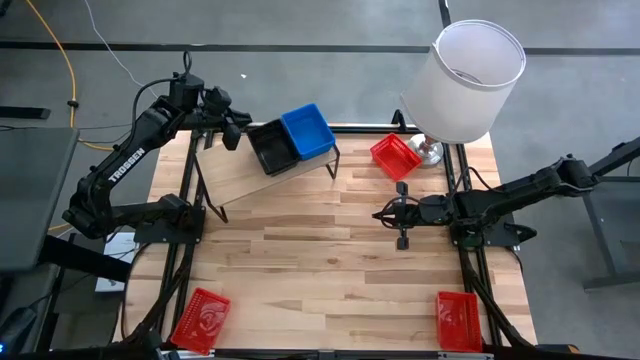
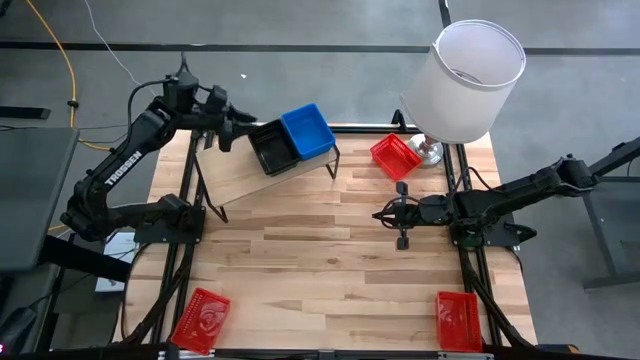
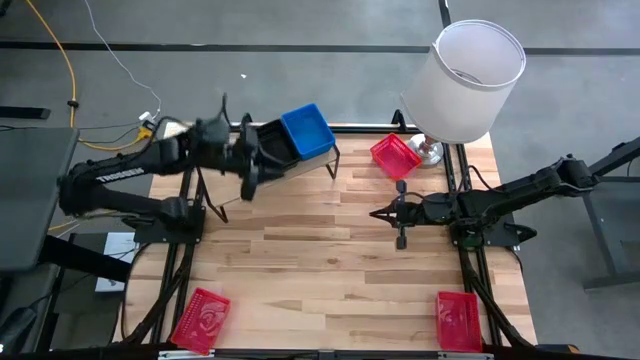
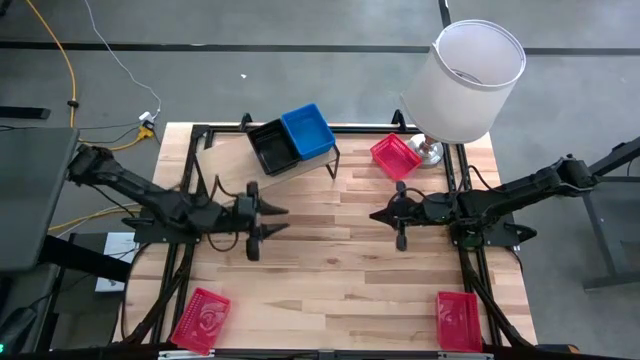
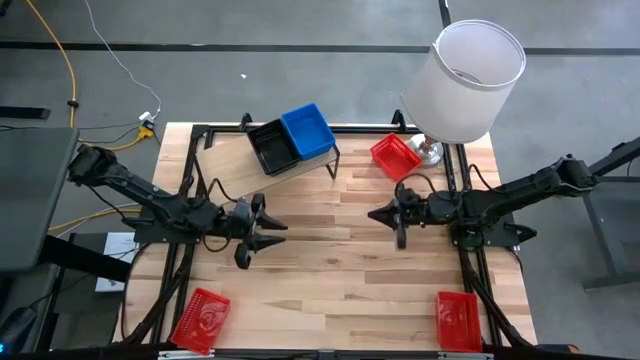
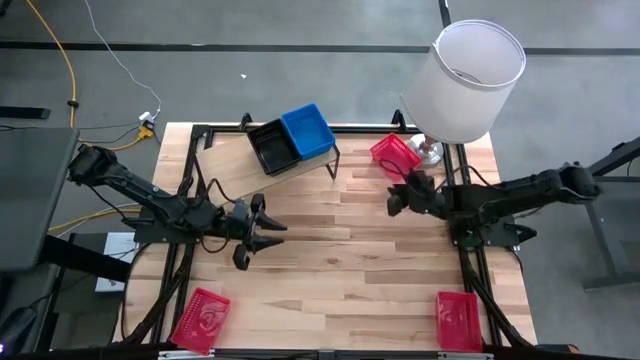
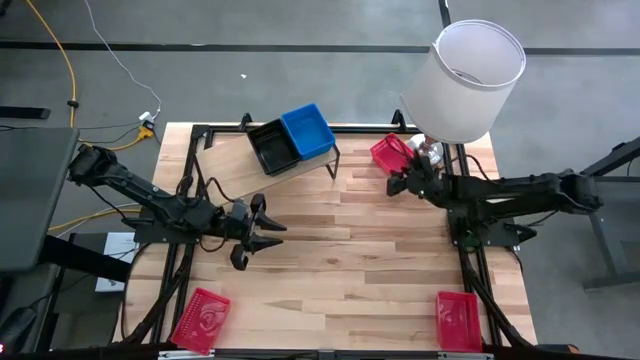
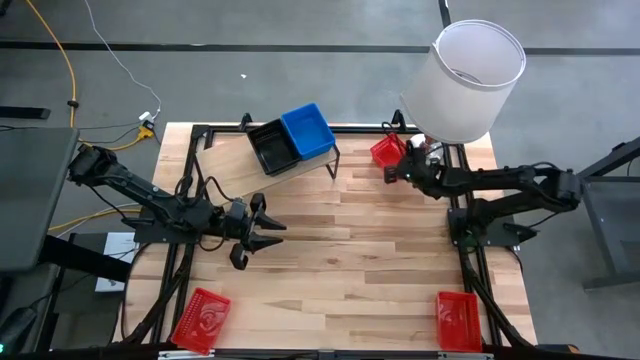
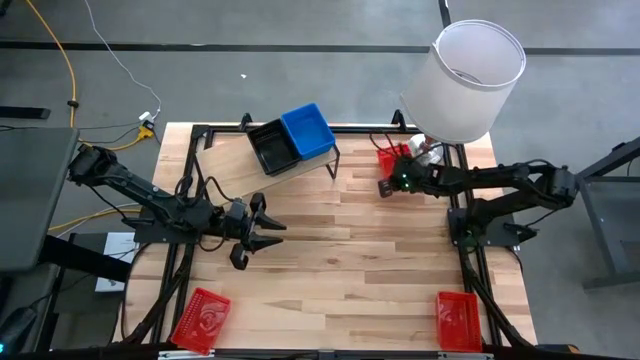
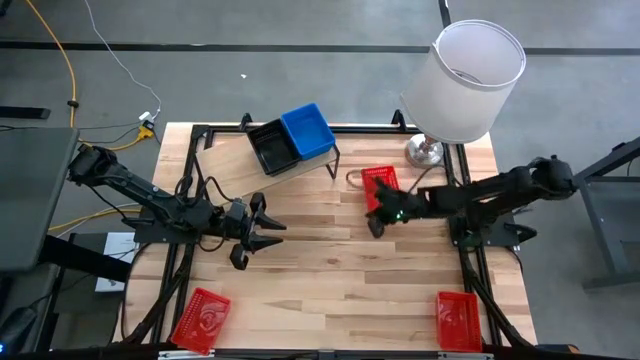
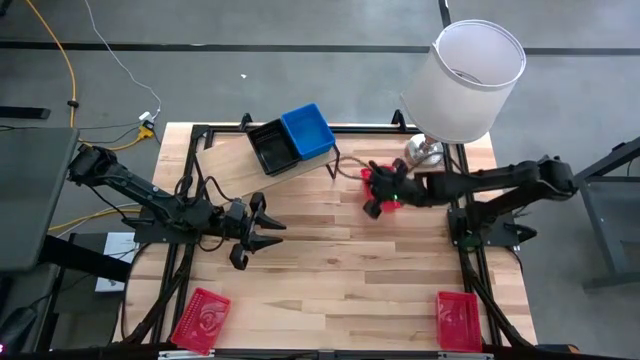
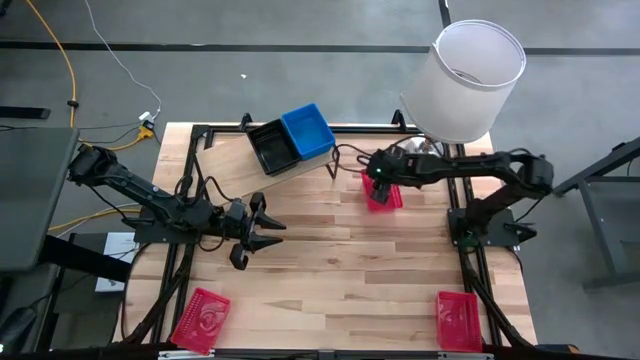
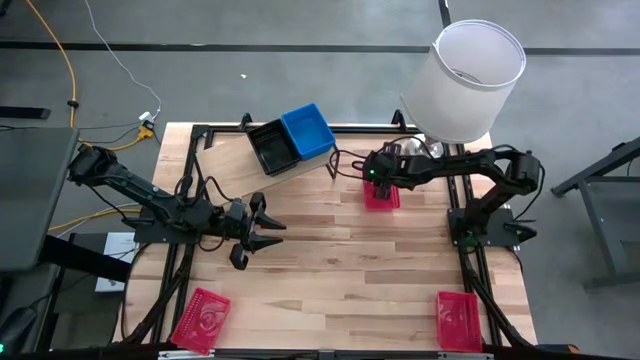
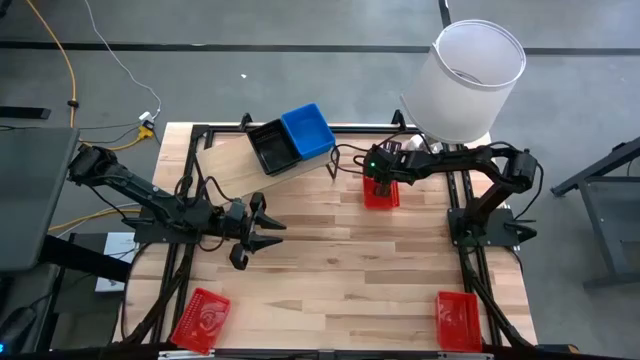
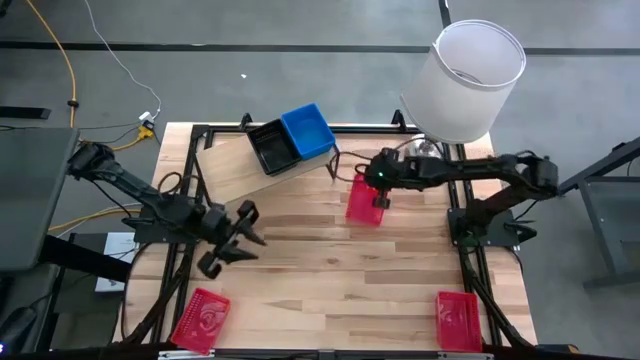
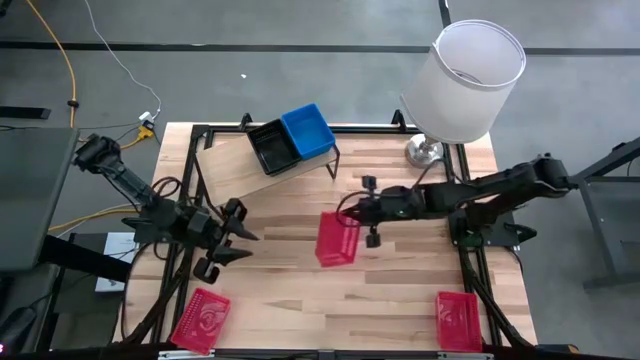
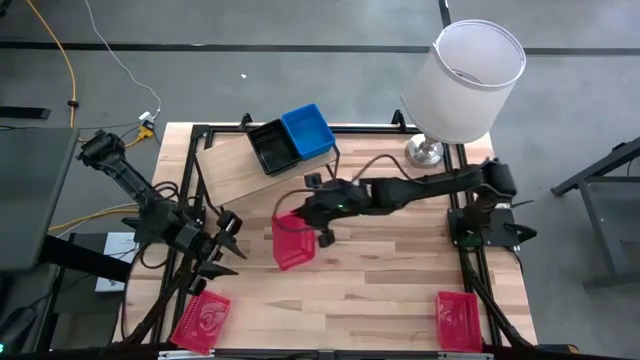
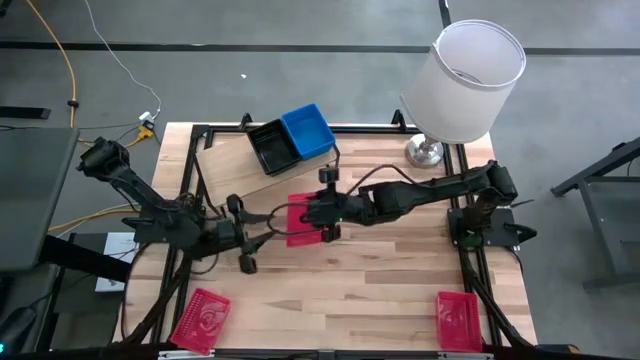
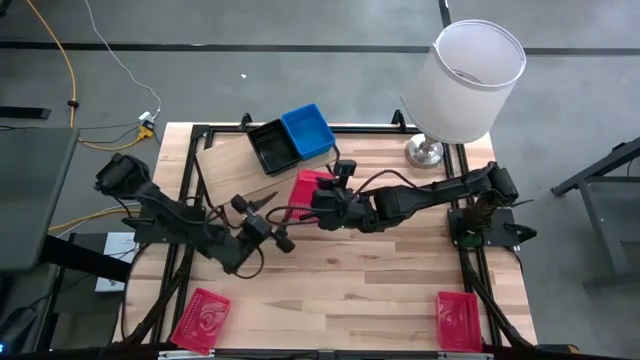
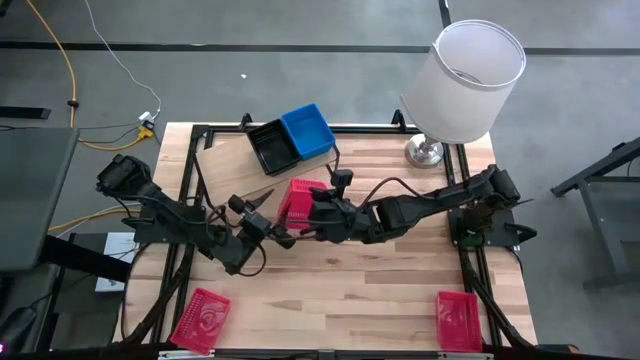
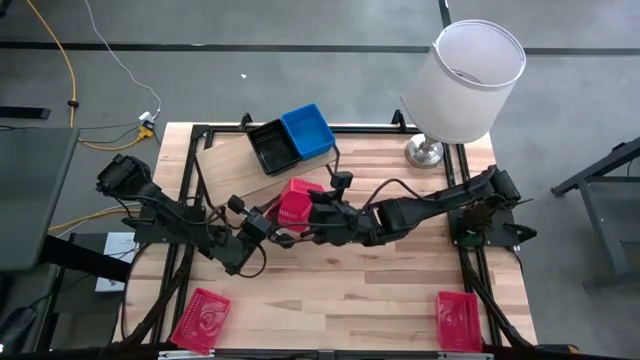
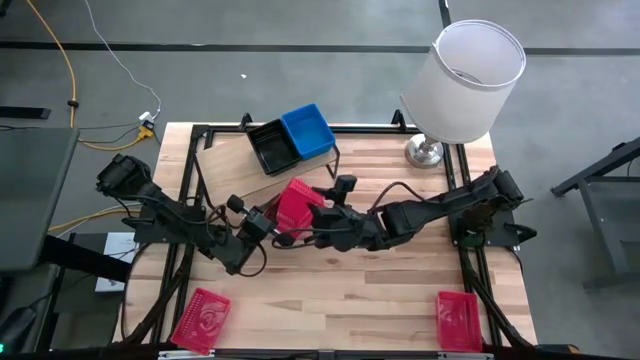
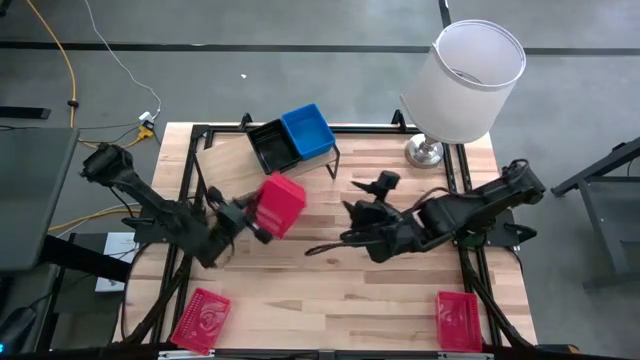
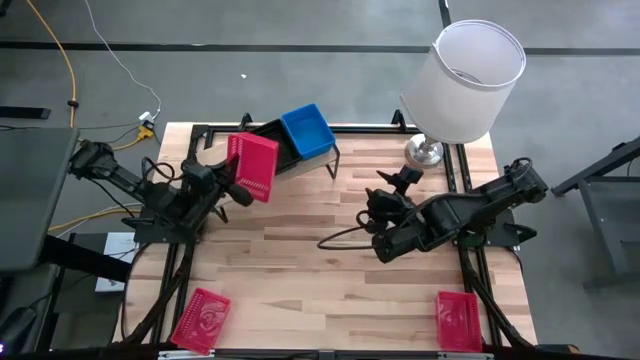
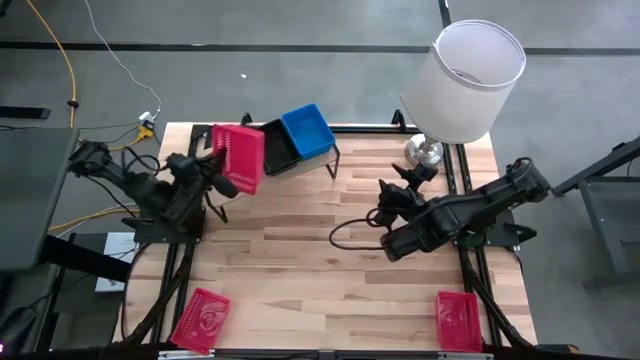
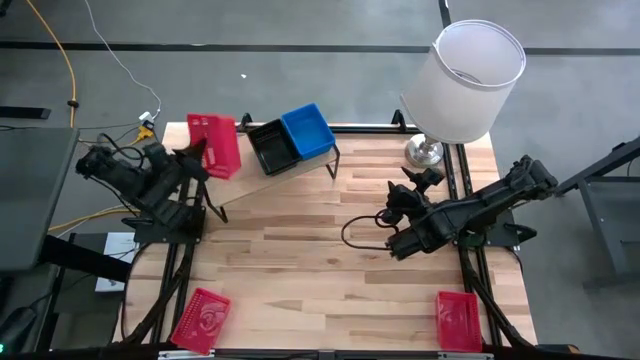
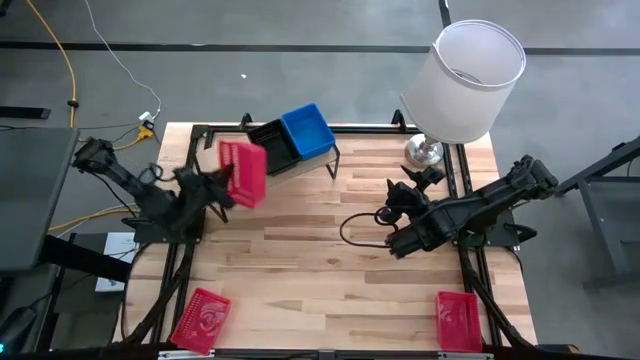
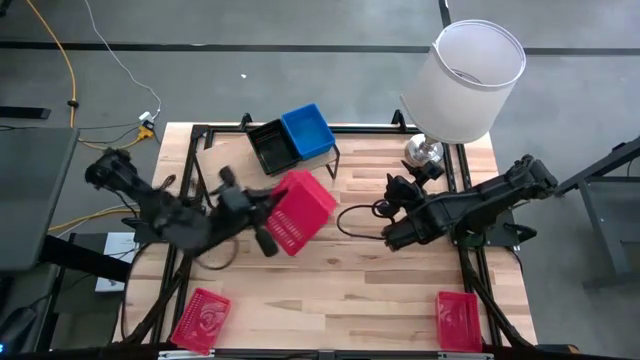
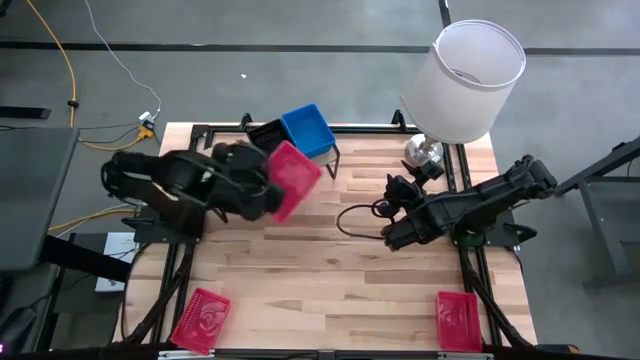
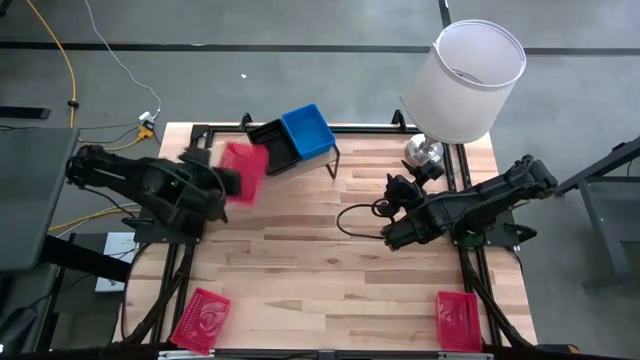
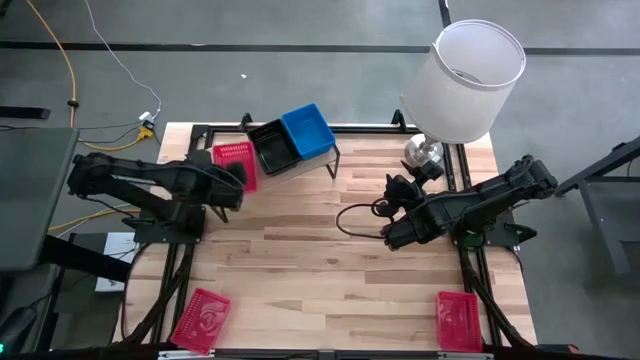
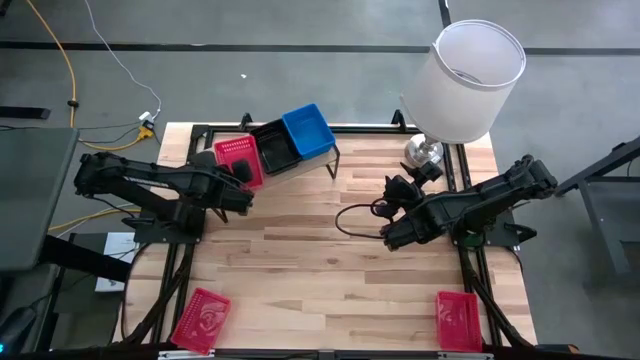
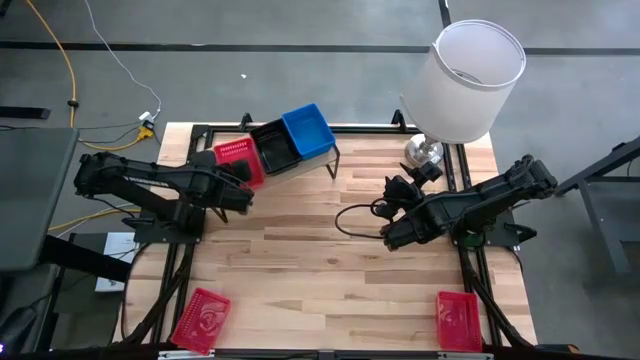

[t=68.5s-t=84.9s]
Task: Stack baskets on shelf by color
Put the top right red bin on the shelf

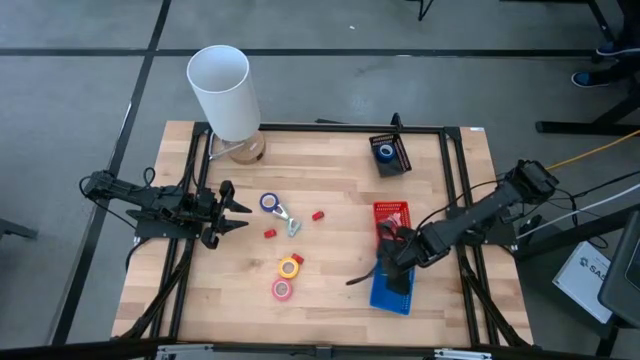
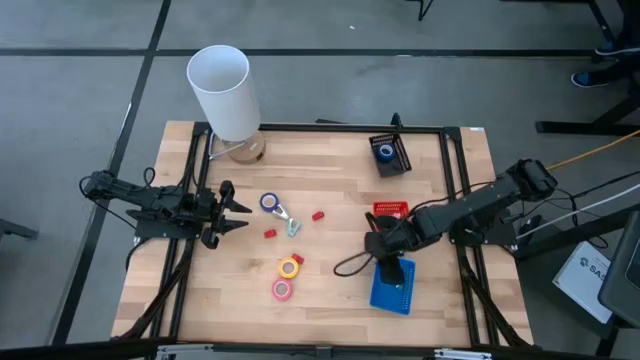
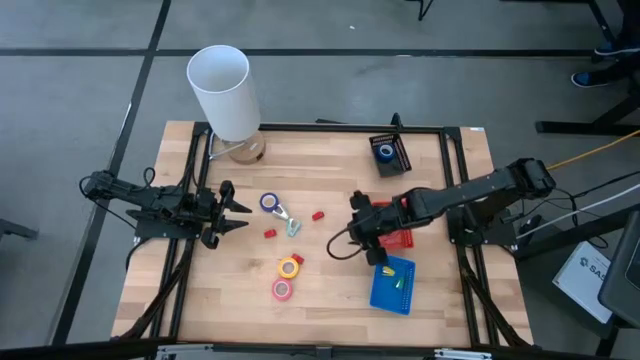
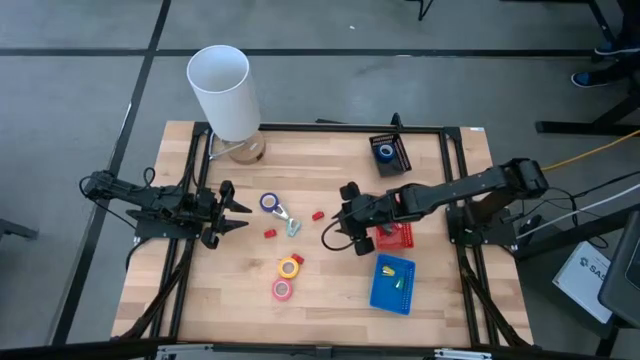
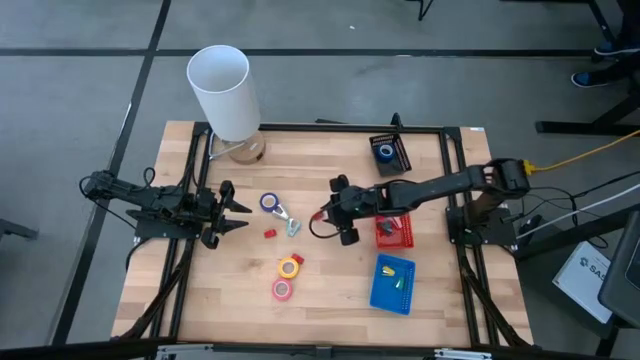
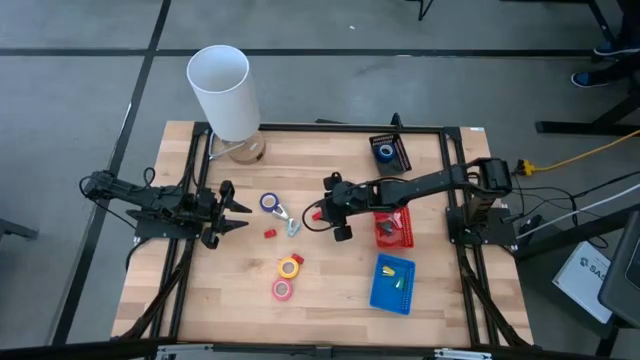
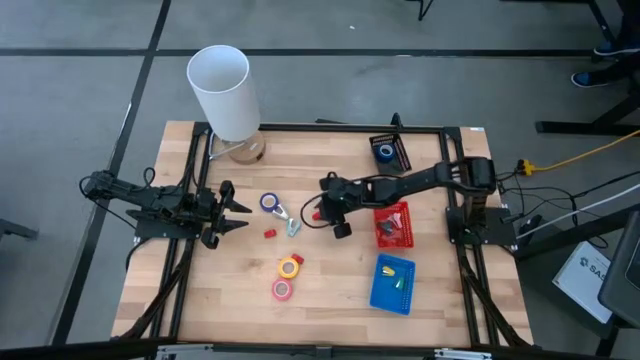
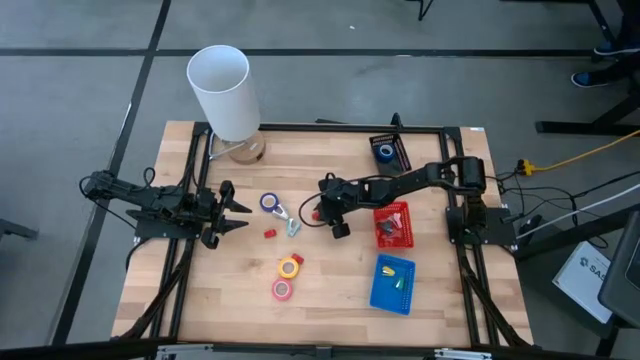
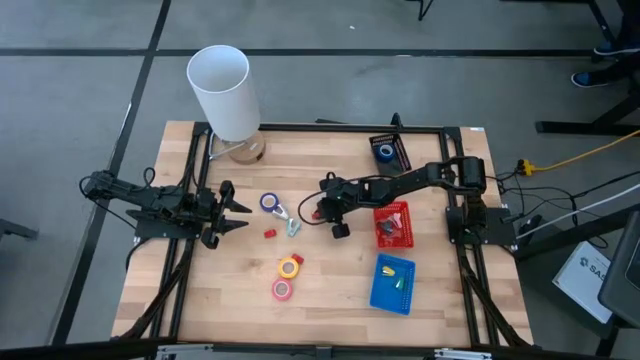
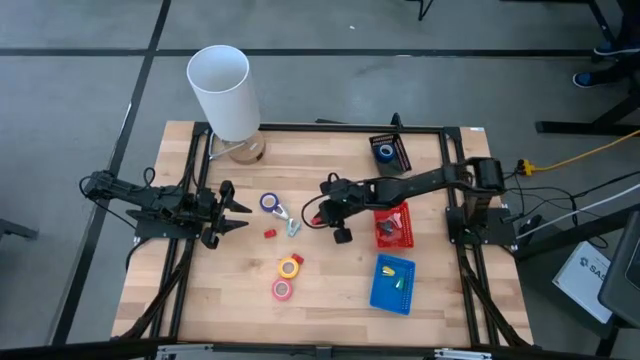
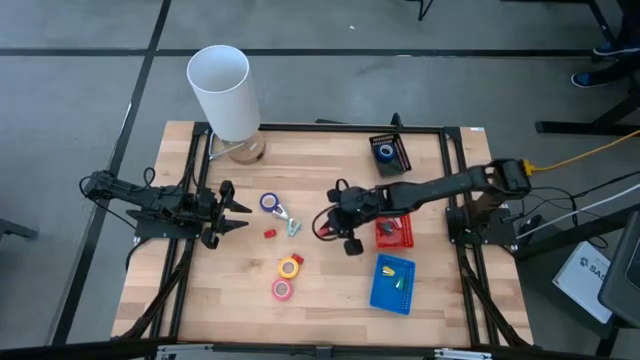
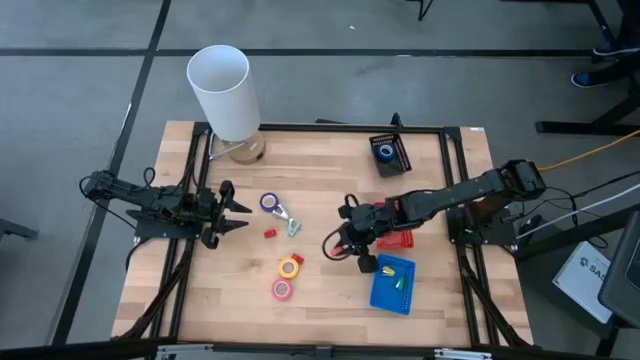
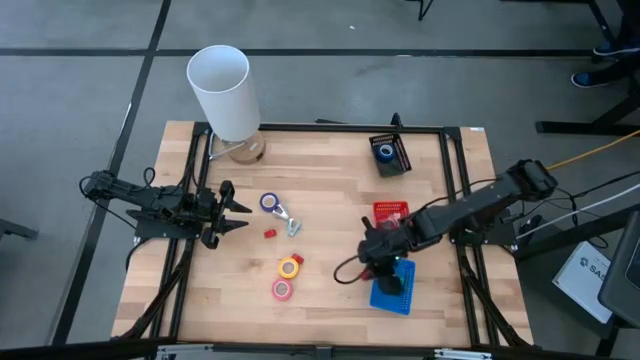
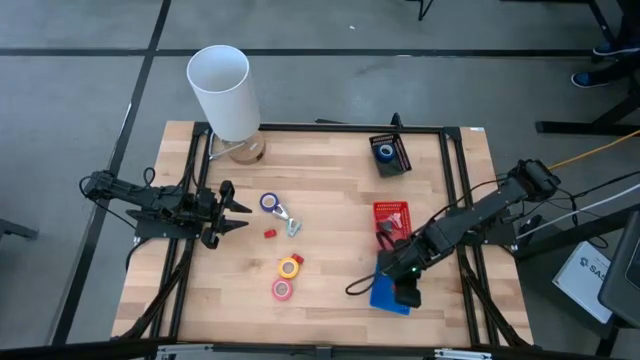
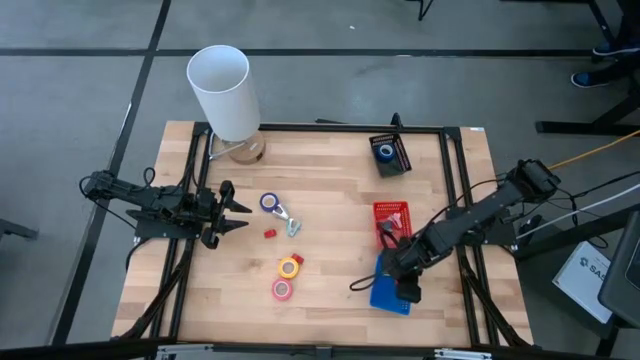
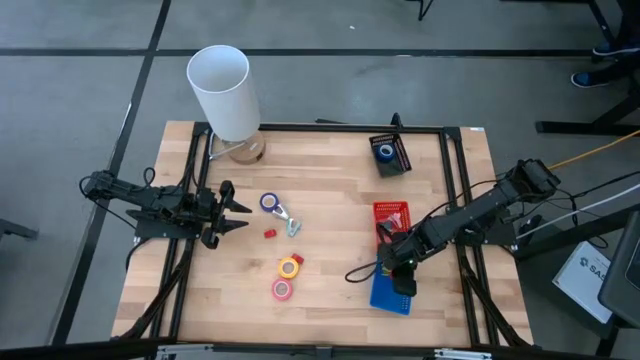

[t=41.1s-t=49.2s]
Task: Pick and place Stapler, Stapler remover, tape
Put the top right red stapler into the blue basket
